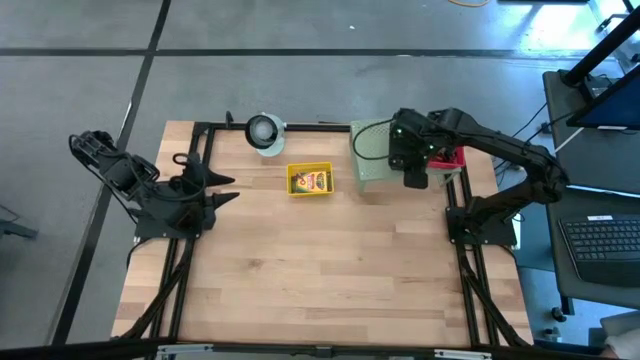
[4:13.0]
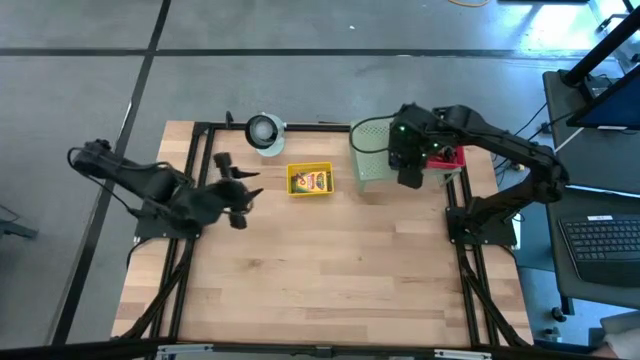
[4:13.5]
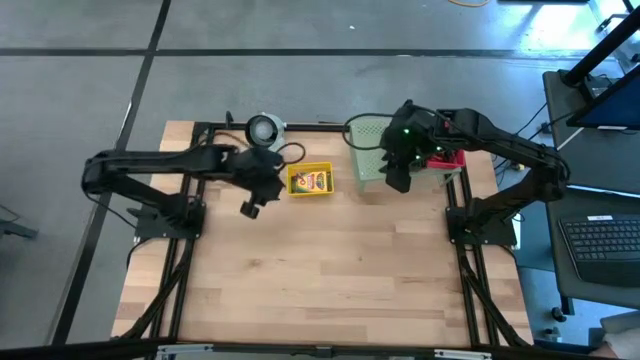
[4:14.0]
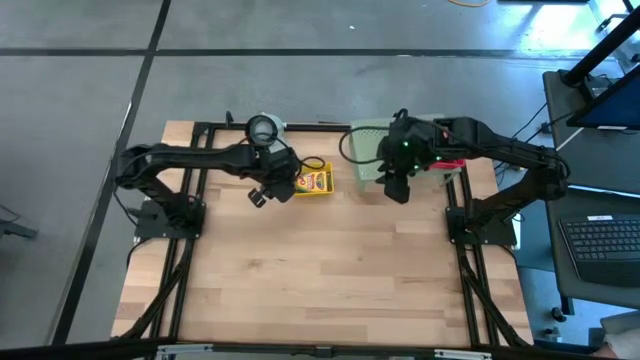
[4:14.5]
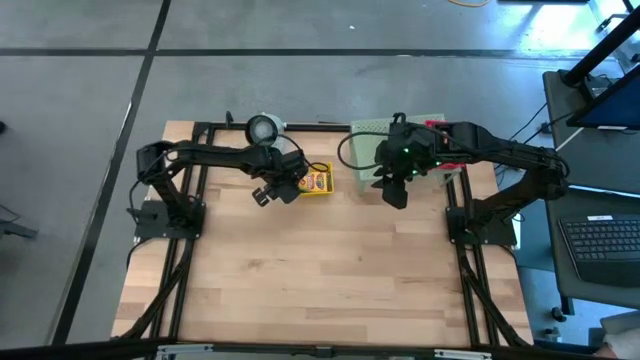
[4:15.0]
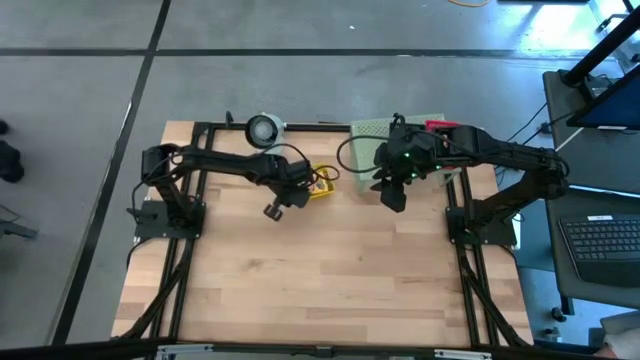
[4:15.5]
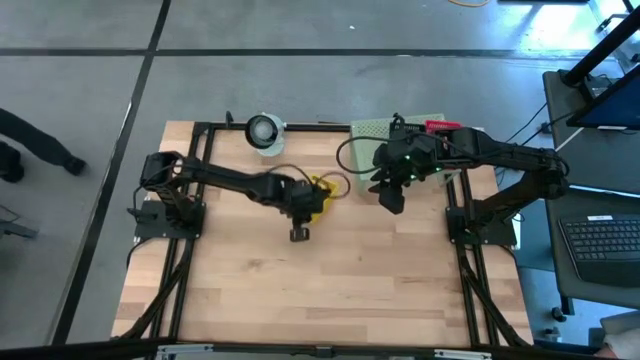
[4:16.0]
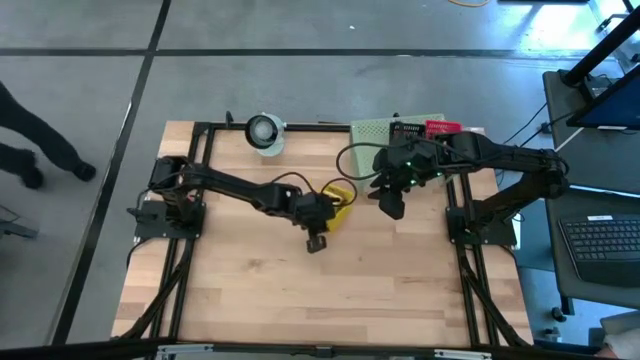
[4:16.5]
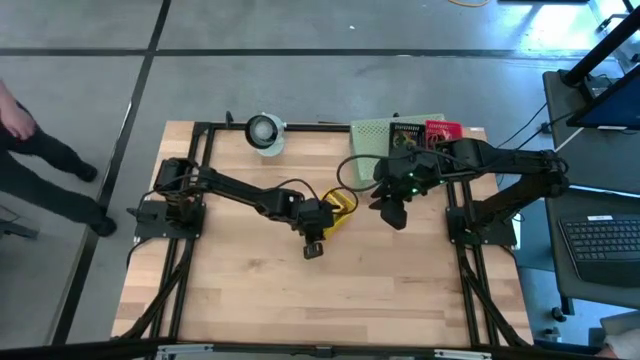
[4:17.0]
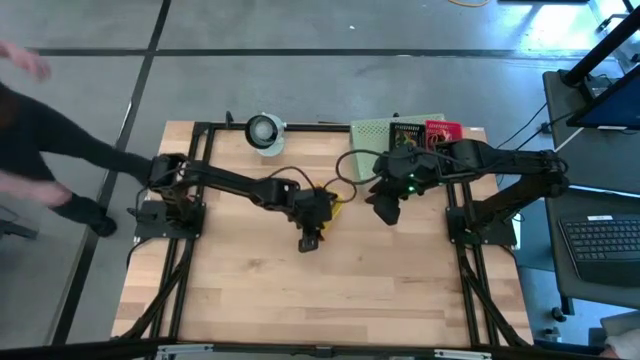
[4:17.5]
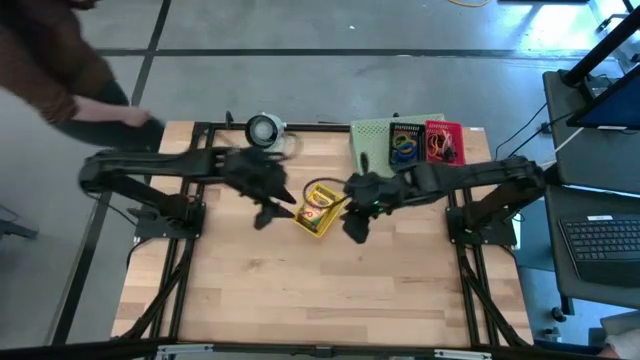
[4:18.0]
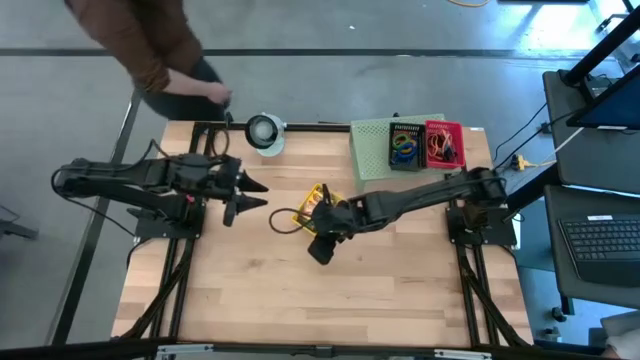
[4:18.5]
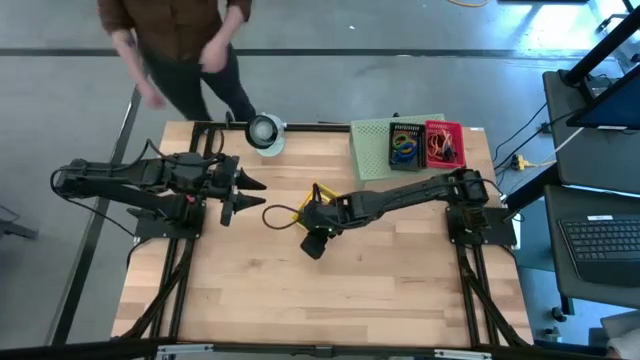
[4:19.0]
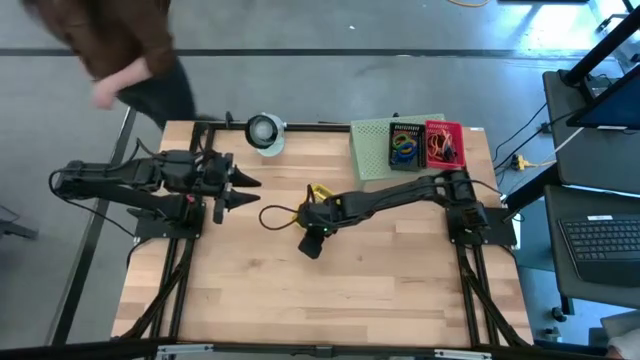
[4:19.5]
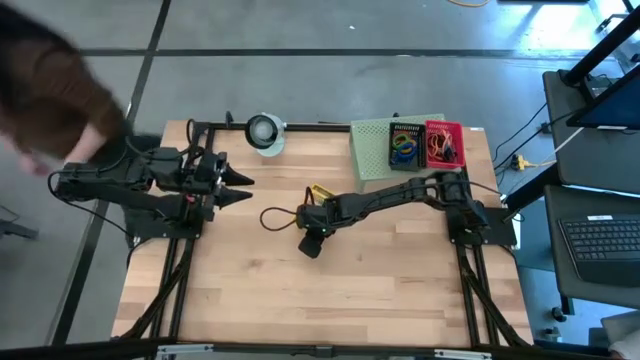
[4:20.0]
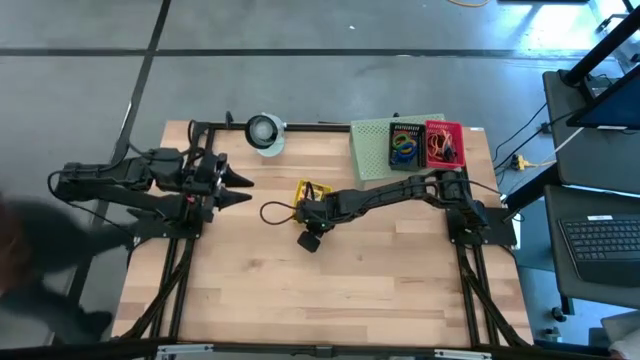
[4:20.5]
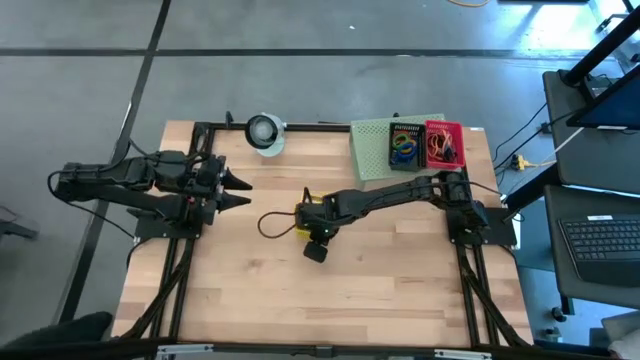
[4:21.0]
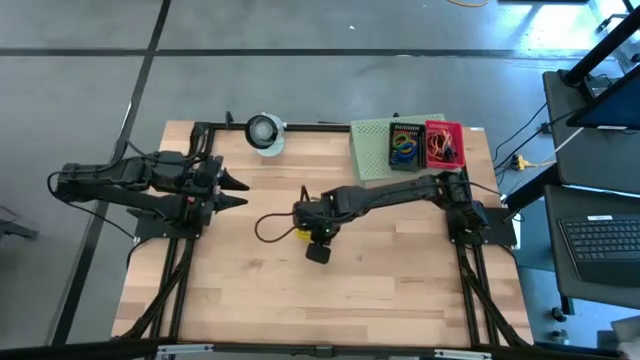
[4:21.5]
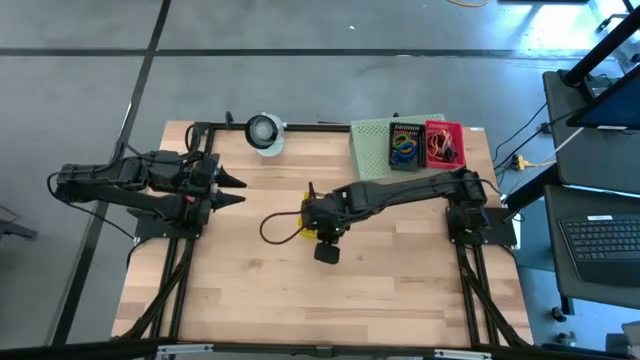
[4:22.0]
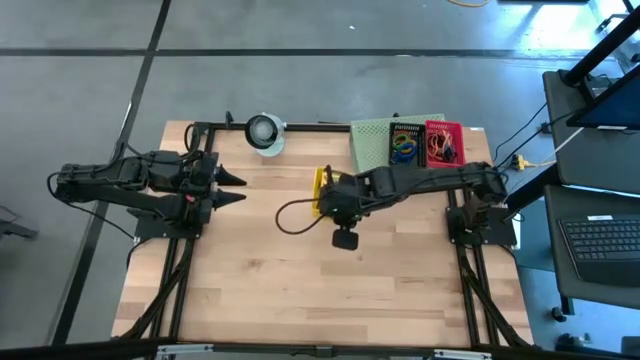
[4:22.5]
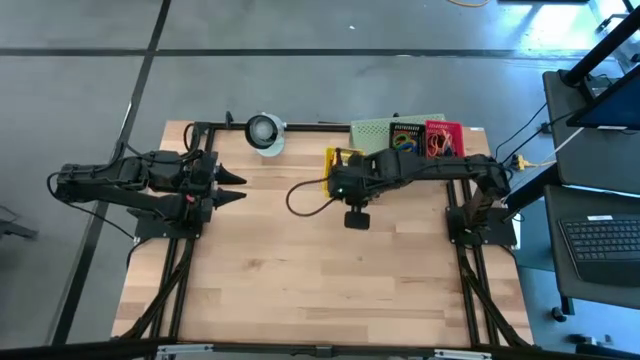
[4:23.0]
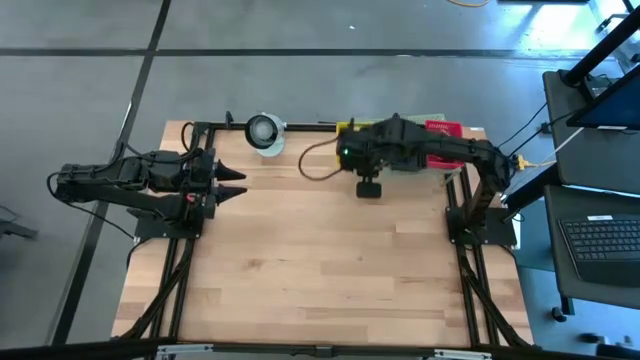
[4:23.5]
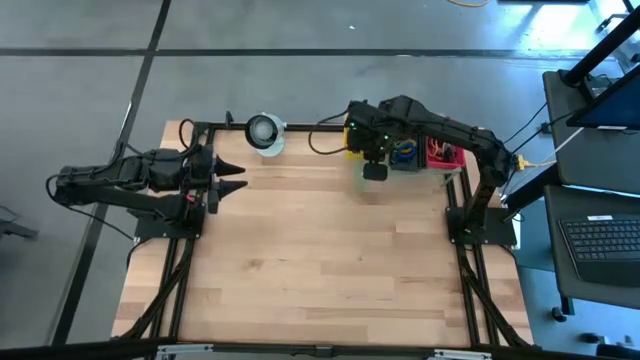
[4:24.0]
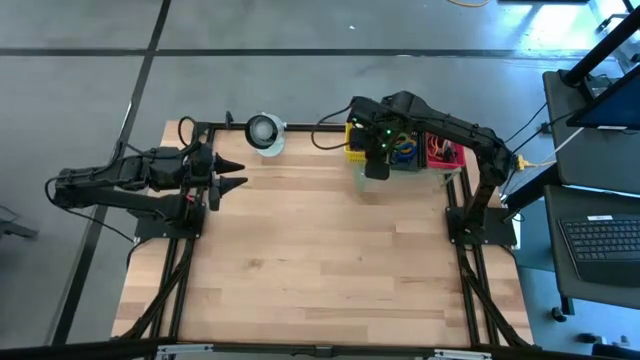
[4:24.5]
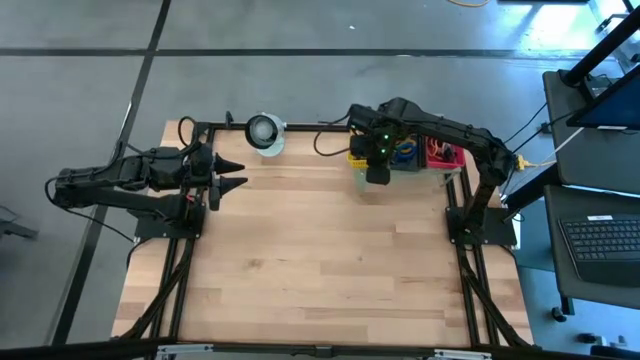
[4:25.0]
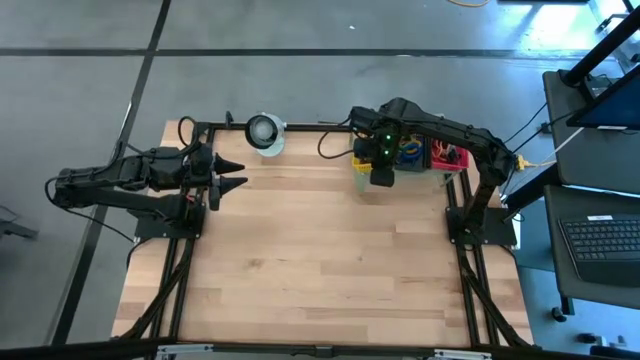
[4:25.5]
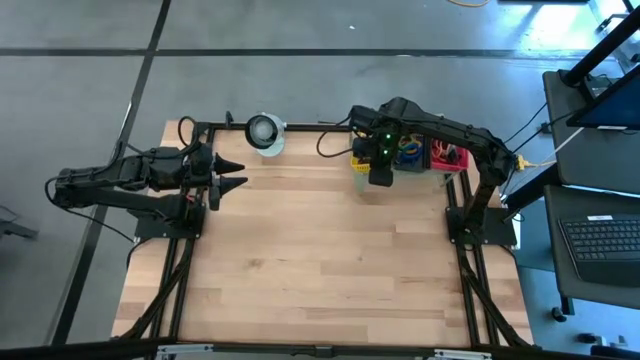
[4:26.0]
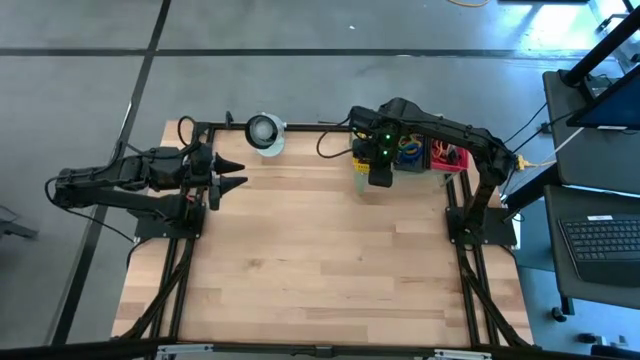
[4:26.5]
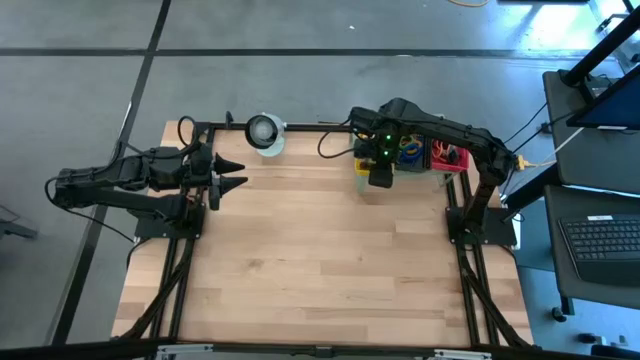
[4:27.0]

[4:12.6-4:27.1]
Task: Pick & Place Office Desk Supplies
Put the yellow bin filled with crayon boxes on the shelf

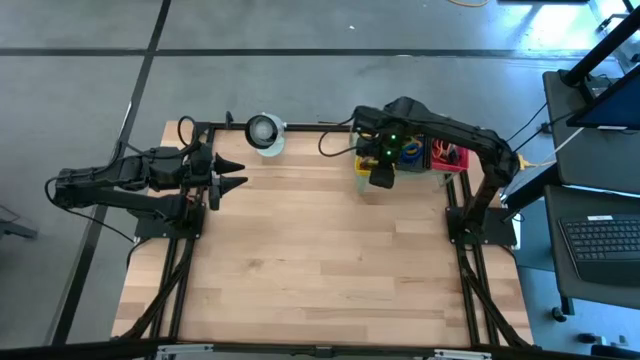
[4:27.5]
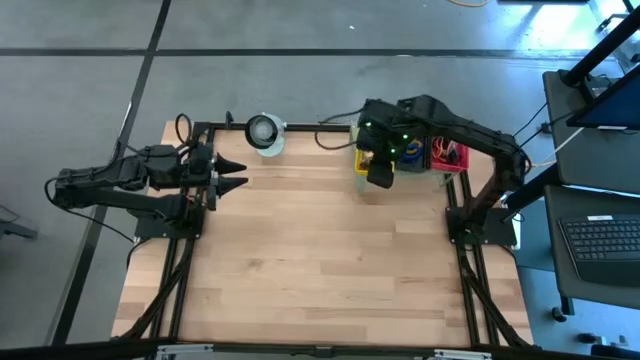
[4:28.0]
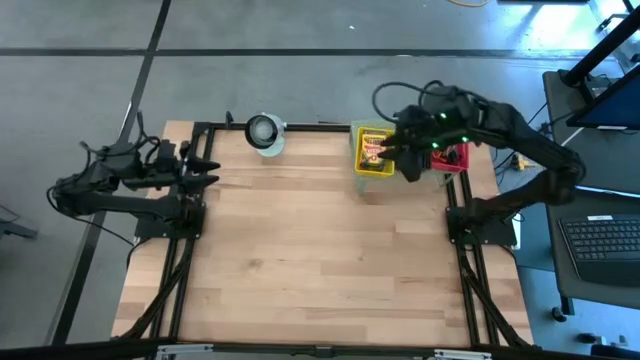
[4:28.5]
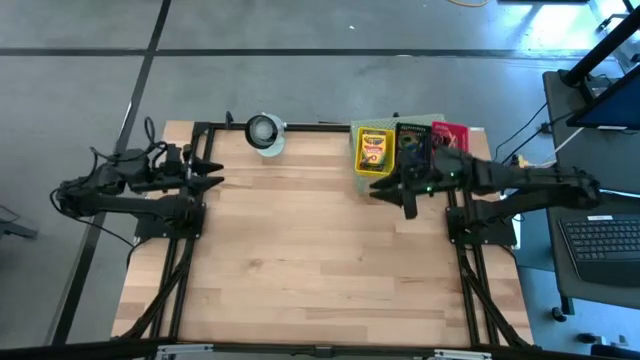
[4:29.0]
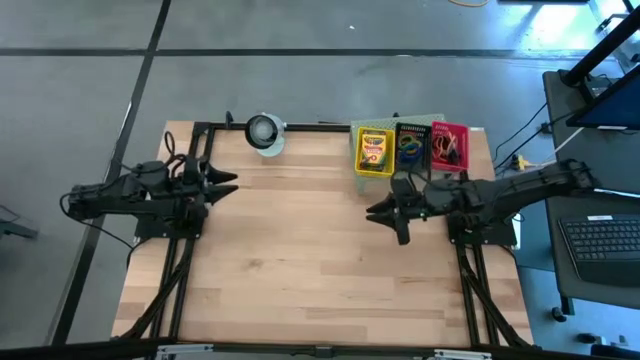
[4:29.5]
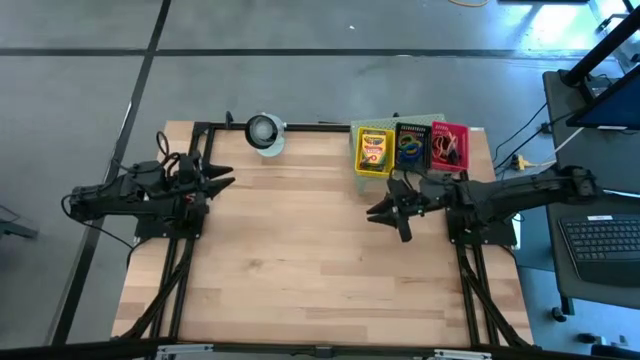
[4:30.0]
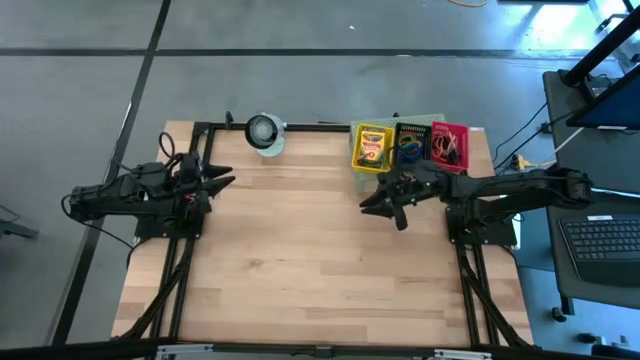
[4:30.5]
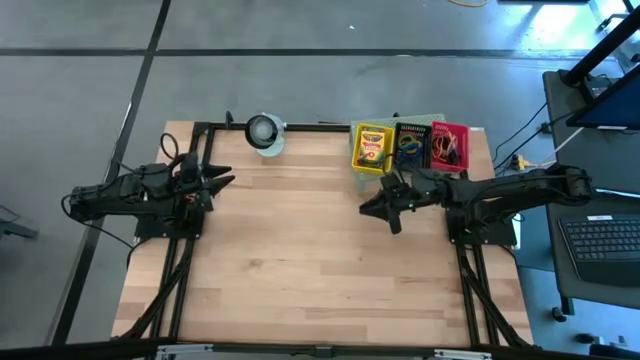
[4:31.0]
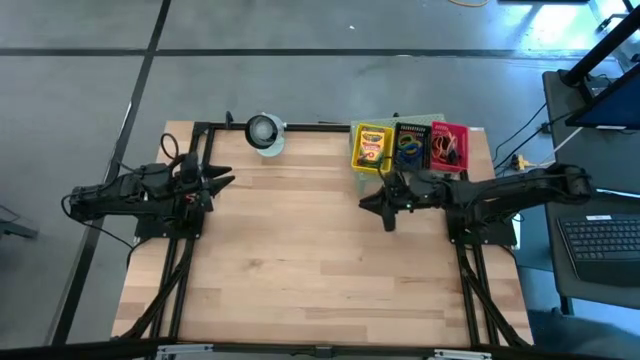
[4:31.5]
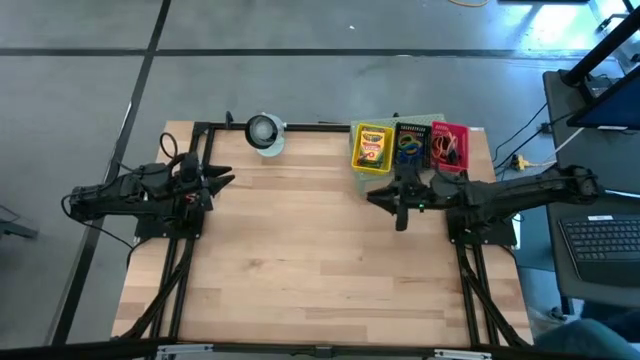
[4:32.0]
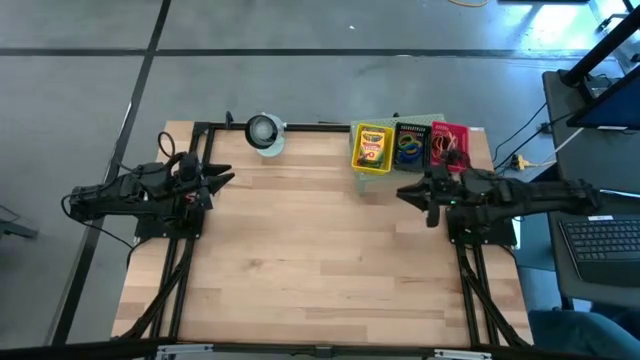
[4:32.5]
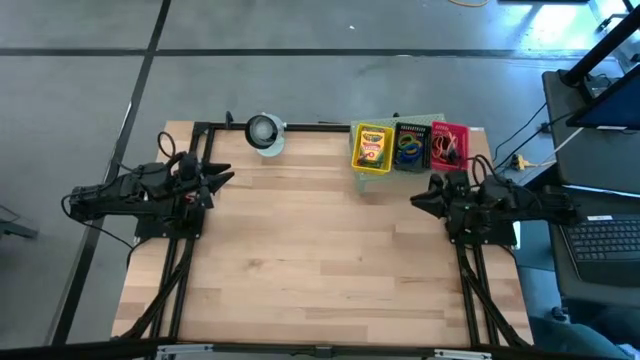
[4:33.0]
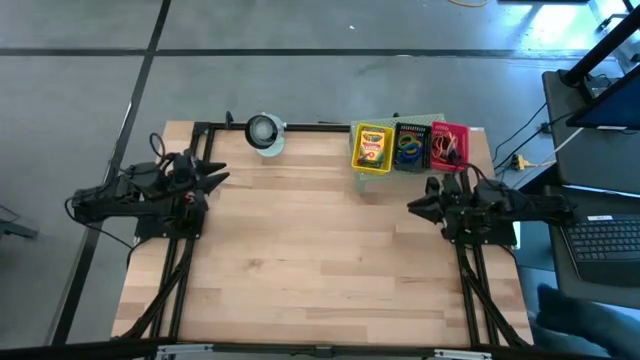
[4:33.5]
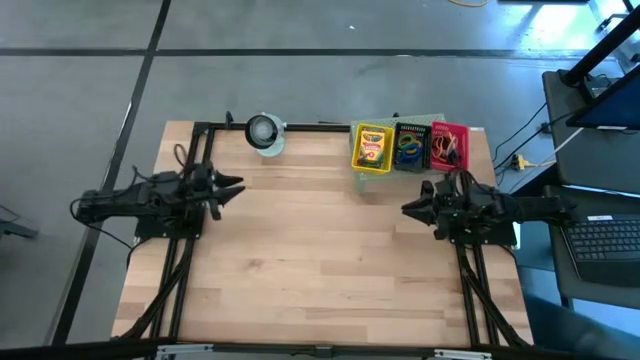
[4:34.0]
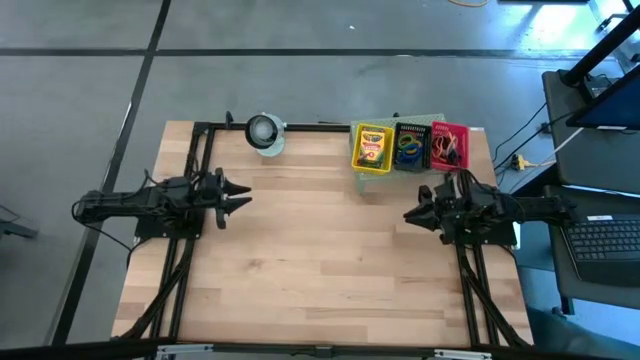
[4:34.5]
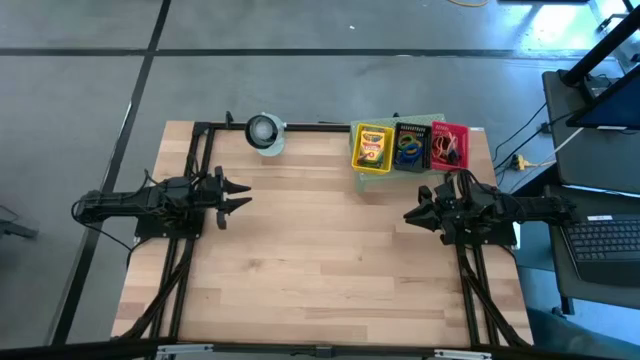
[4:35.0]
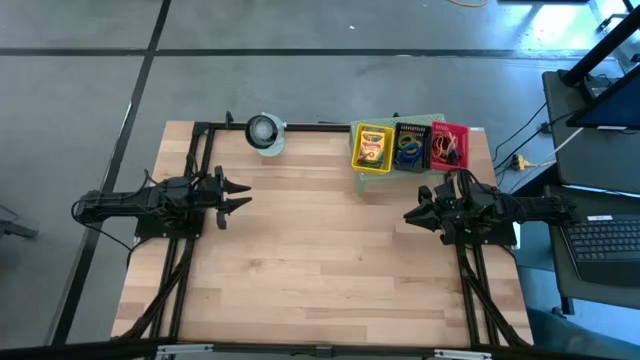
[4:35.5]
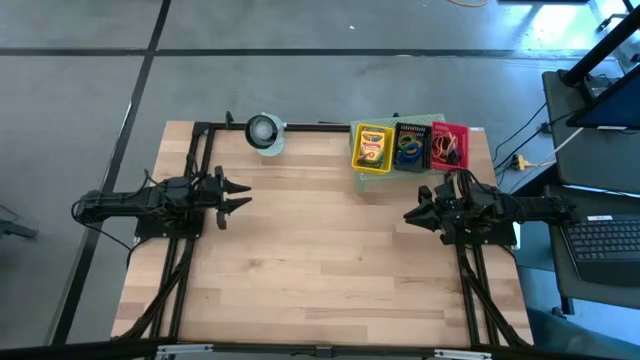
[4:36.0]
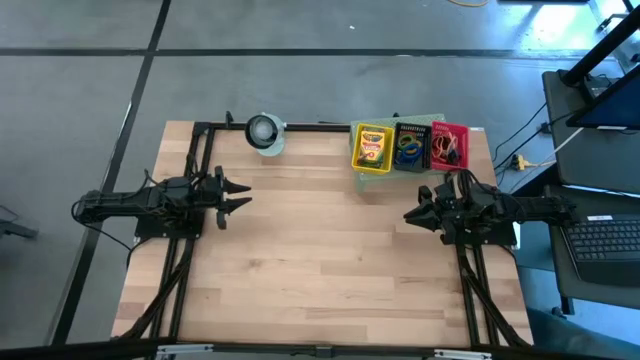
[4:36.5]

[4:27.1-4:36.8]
Return to Home Position
